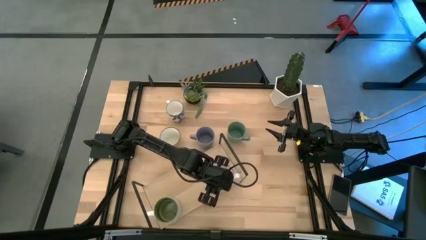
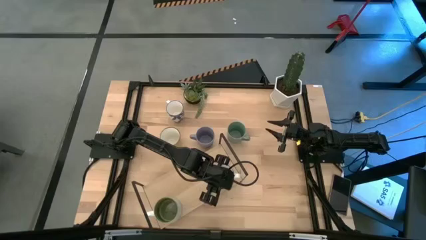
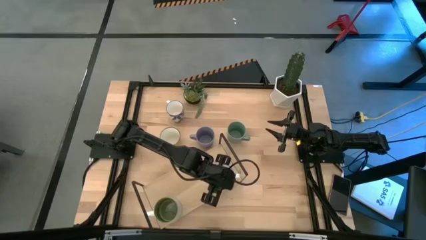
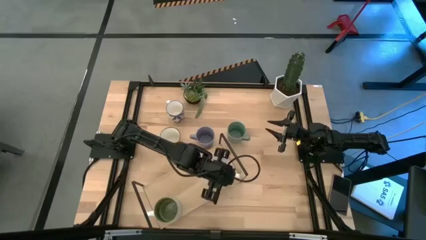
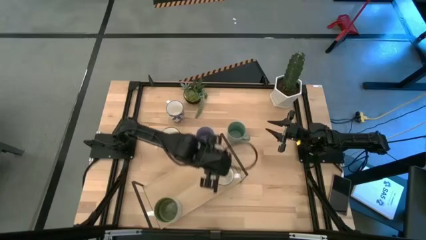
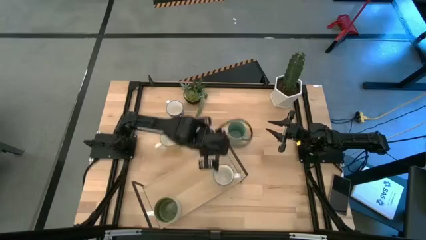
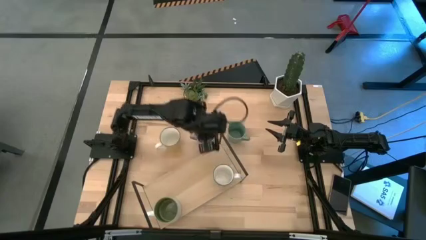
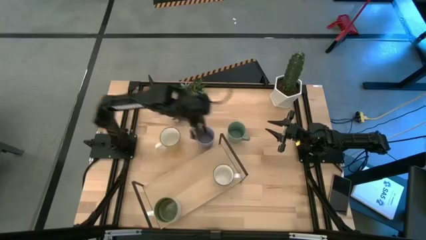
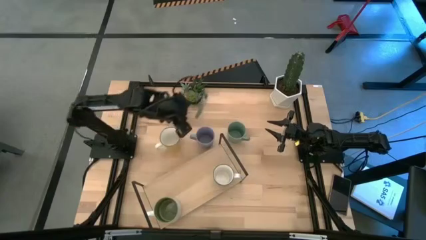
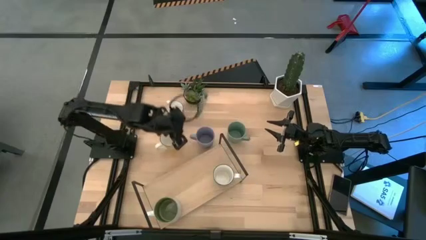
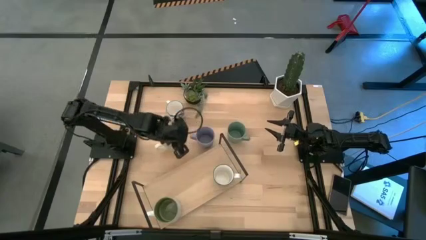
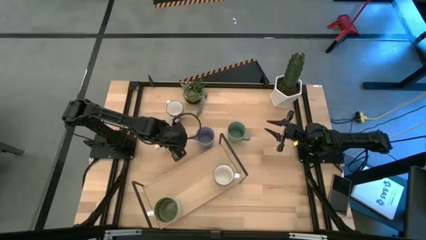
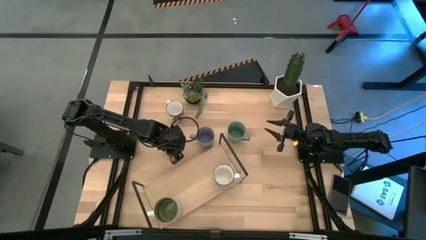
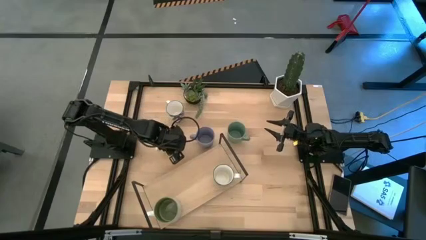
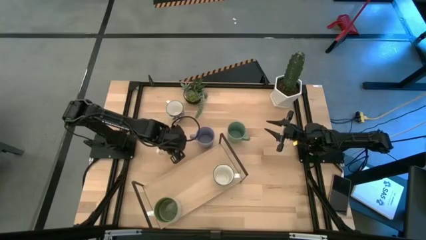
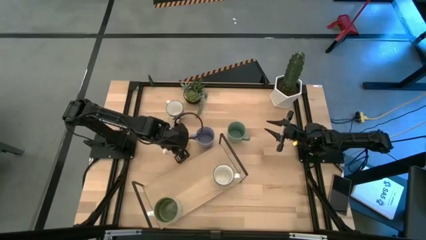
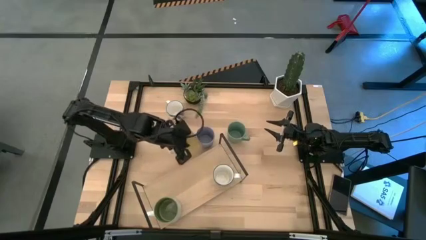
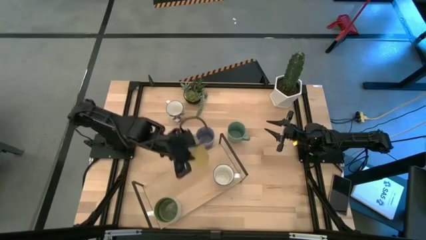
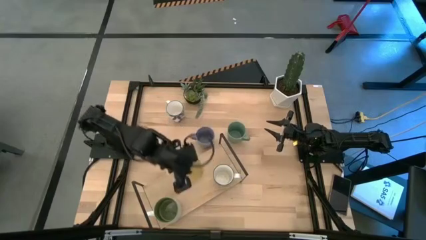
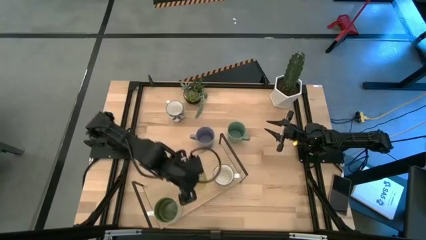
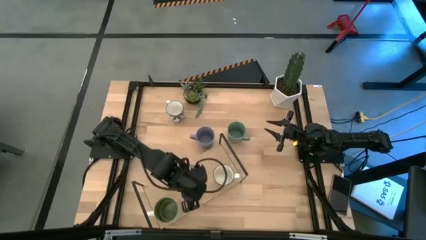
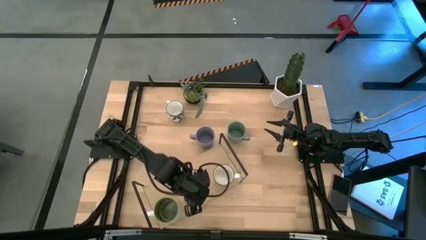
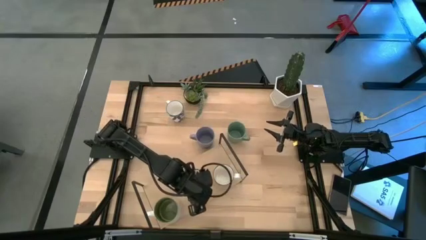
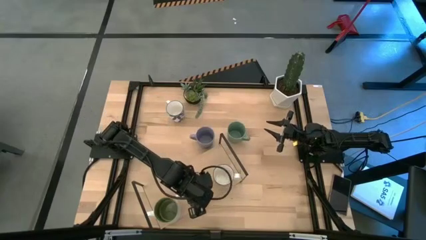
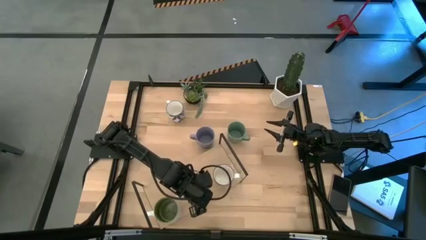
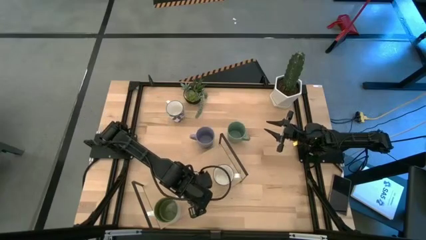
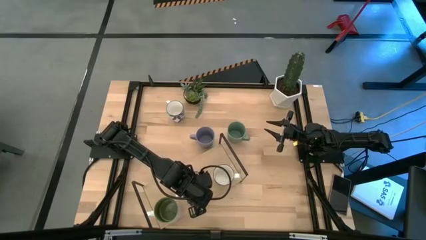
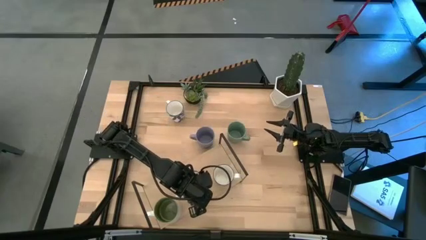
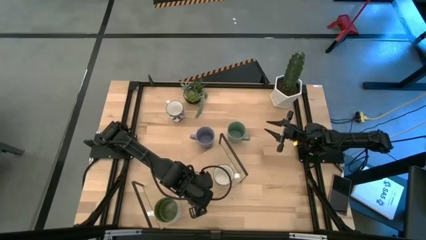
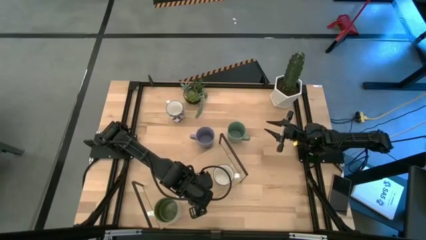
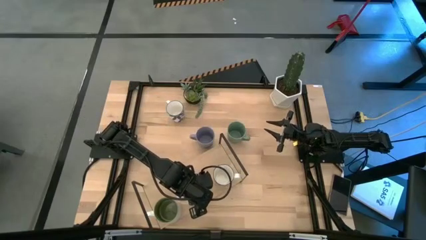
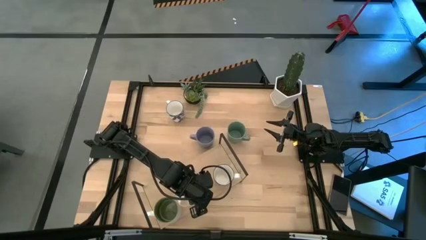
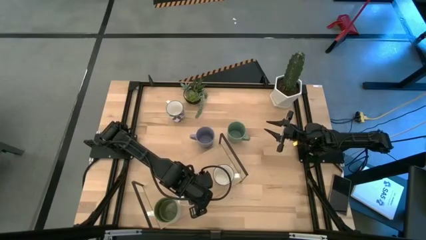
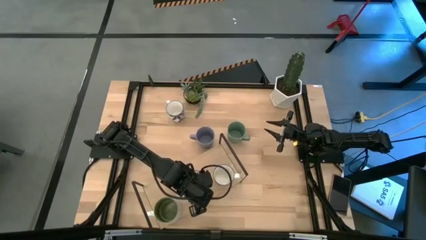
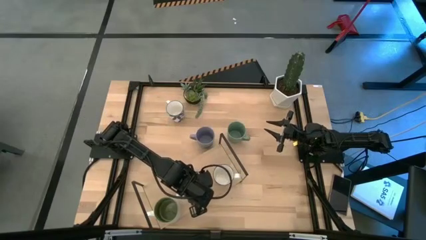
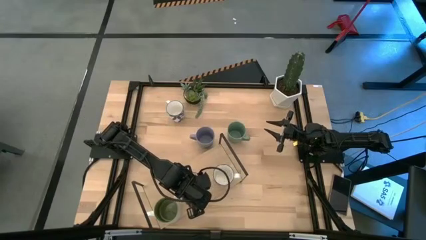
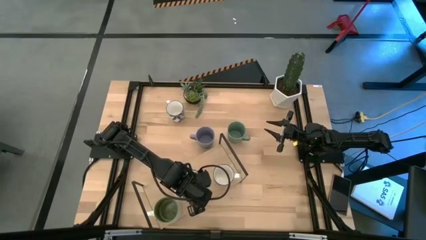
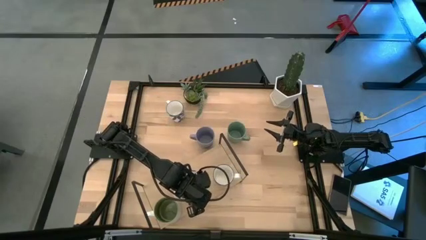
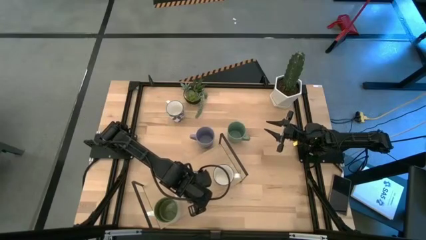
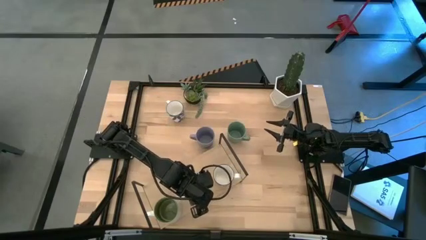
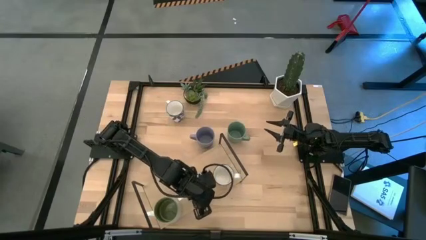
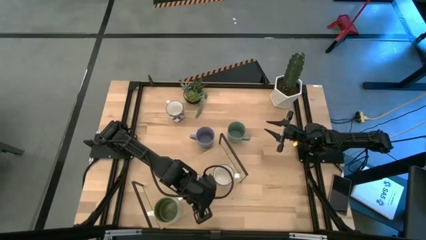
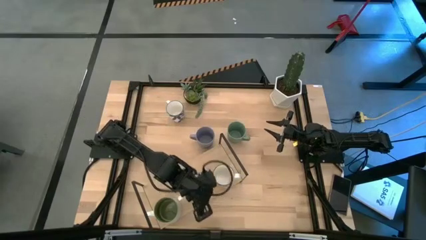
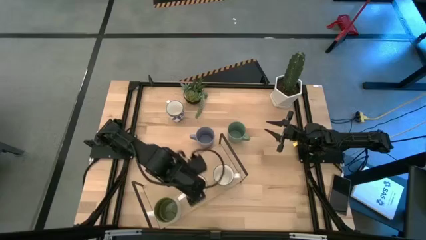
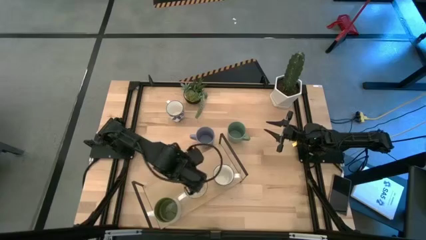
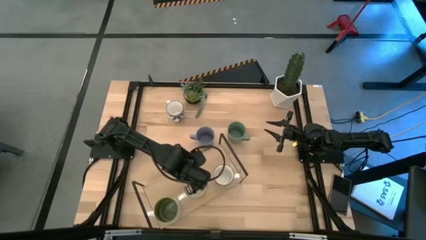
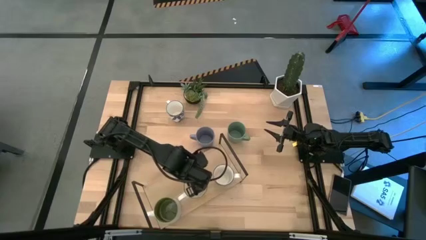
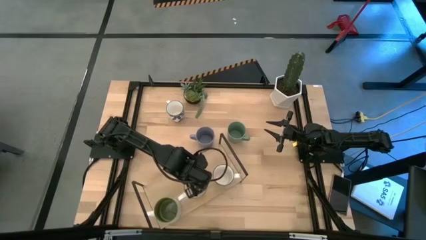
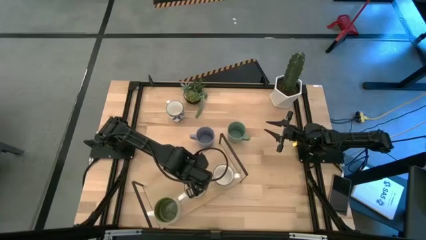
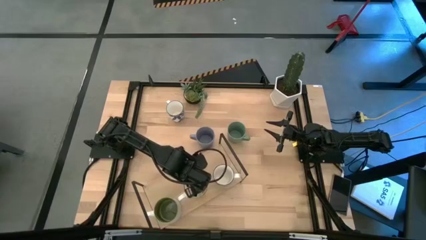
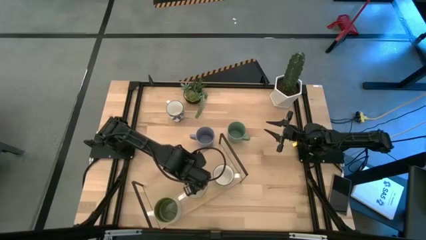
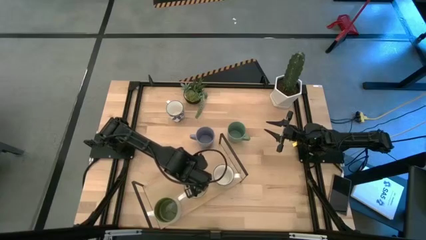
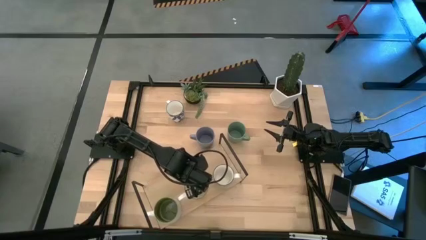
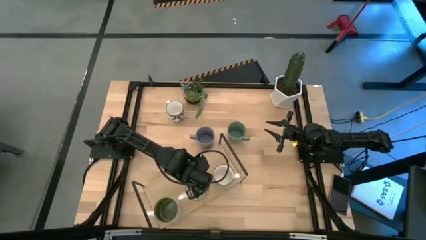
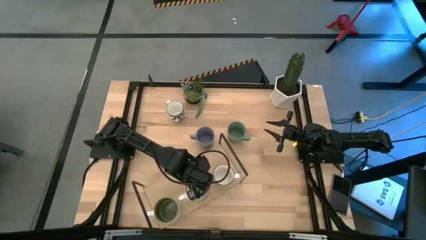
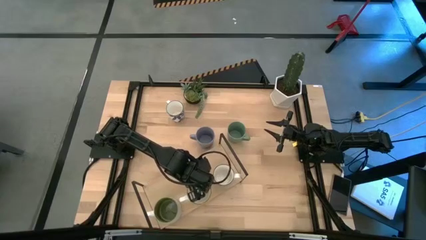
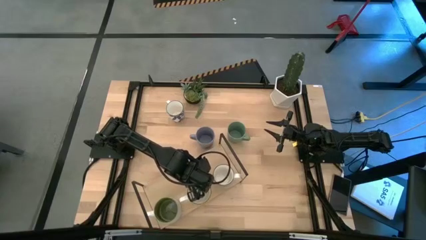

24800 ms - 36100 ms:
Task: Place coffee mugs
Put the yellow mug between the two mugs on the shelf

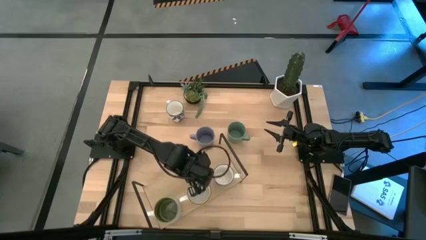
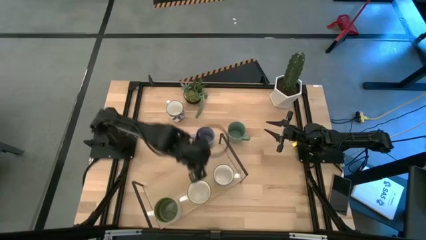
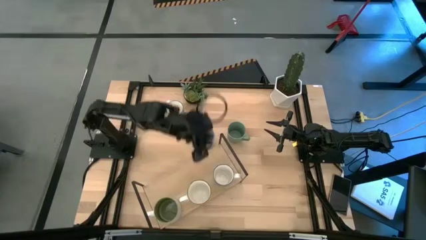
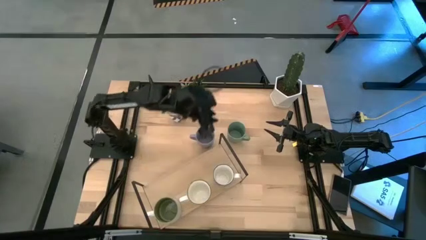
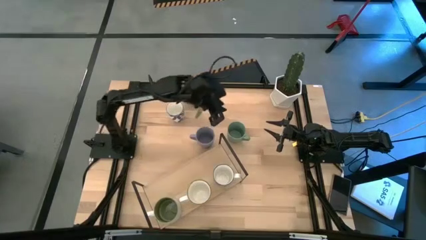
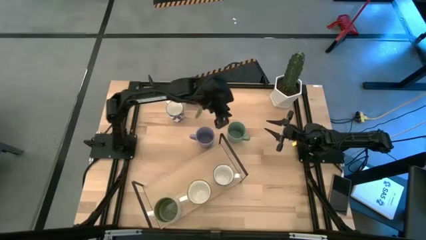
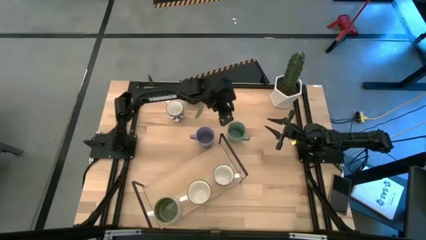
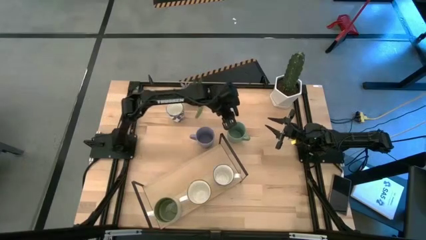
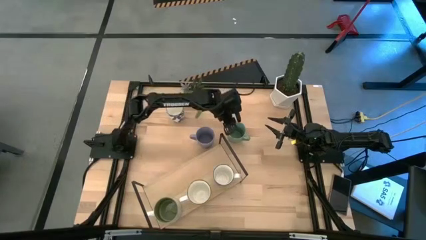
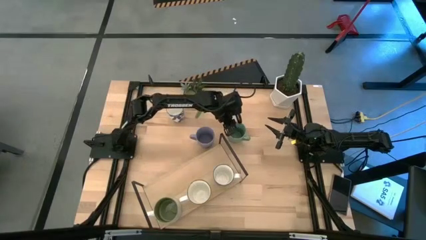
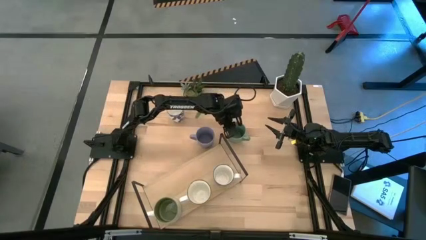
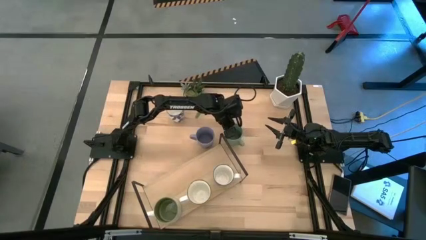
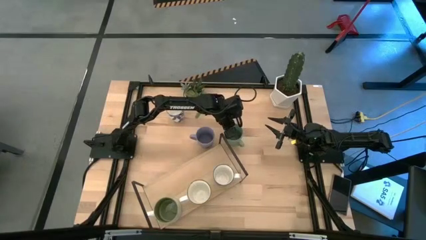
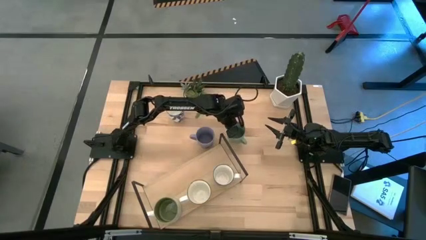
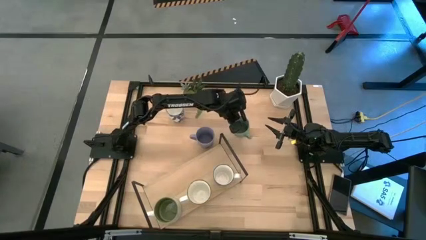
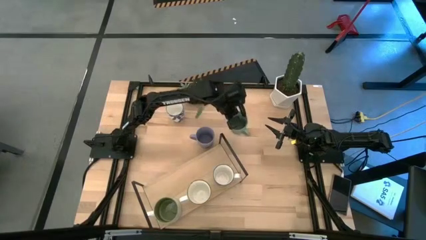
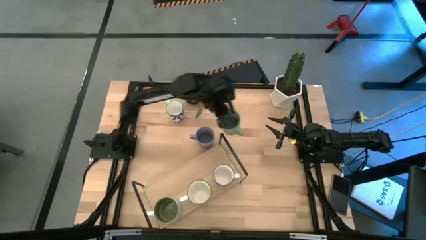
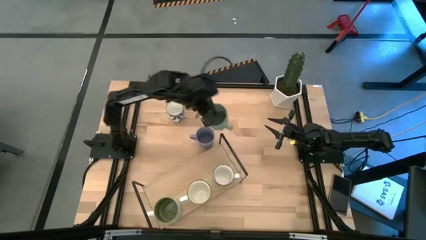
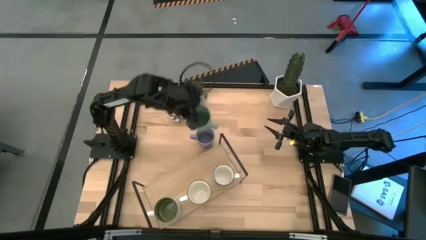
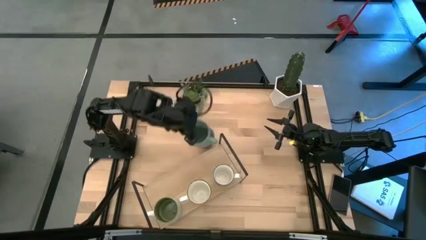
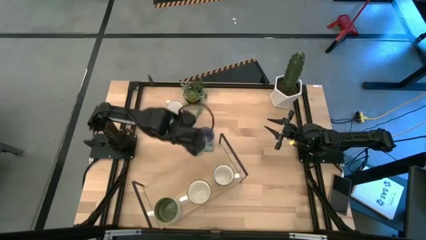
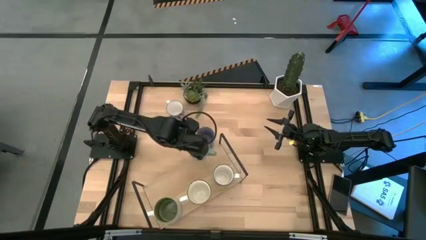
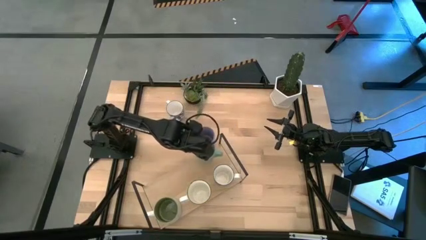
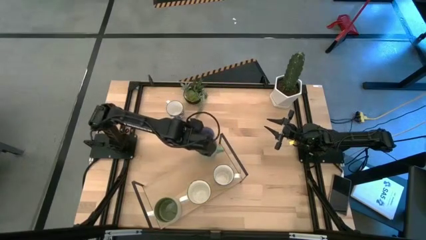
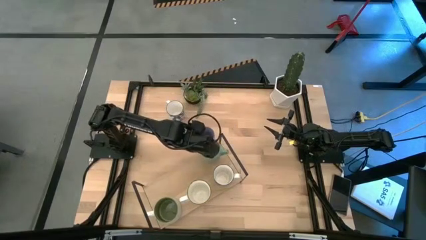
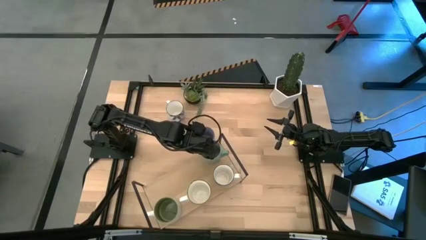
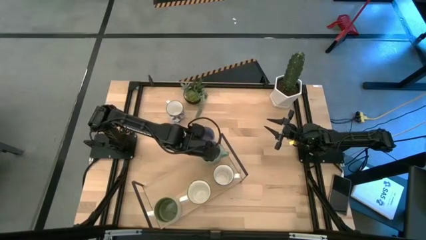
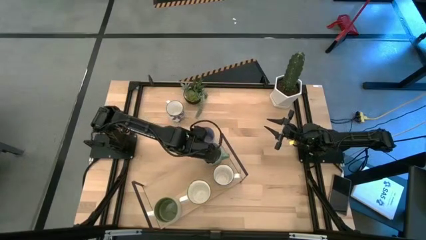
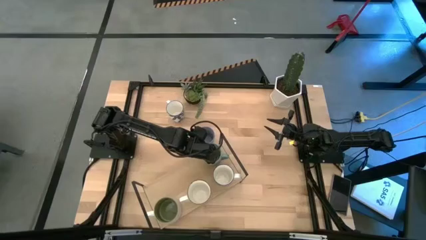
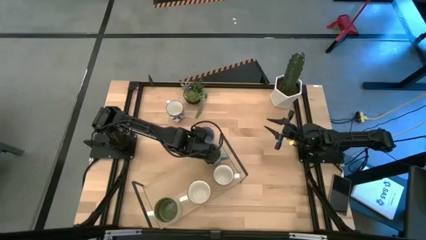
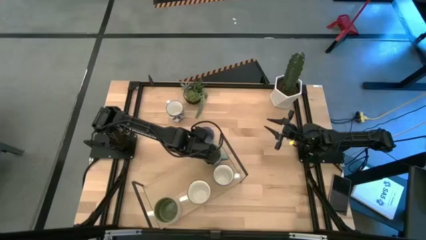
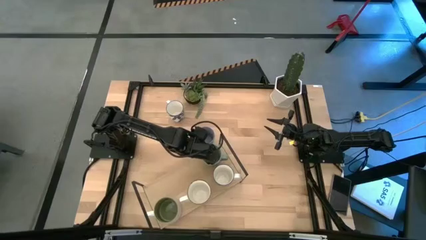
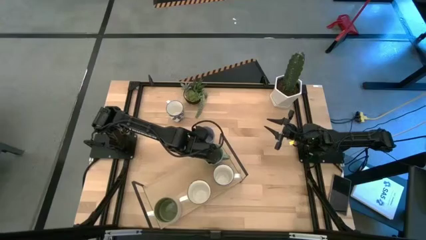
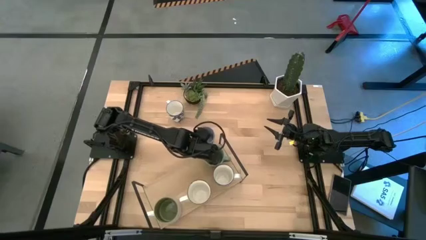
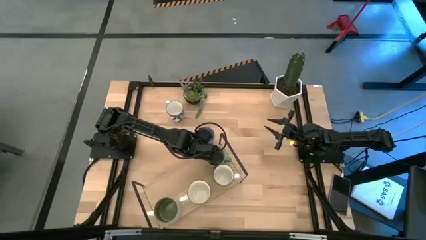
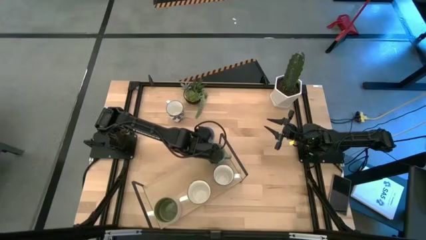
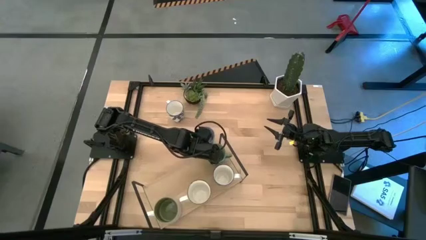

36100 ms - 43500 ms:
Put the green mug at the top right corner of the shelf
